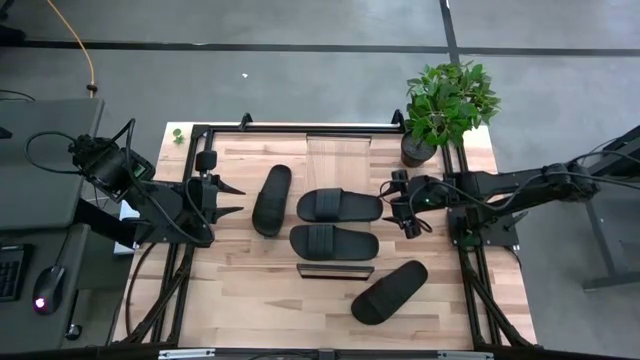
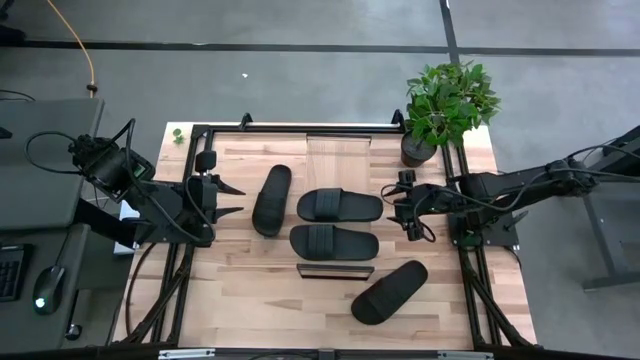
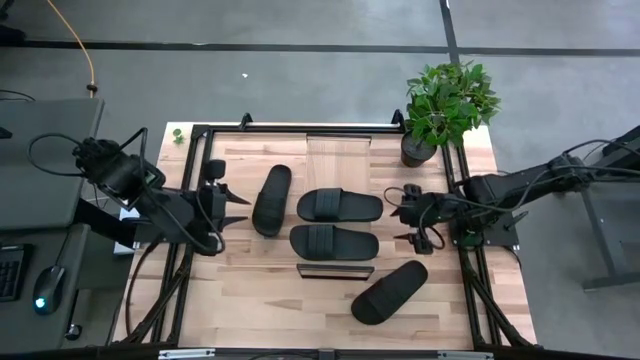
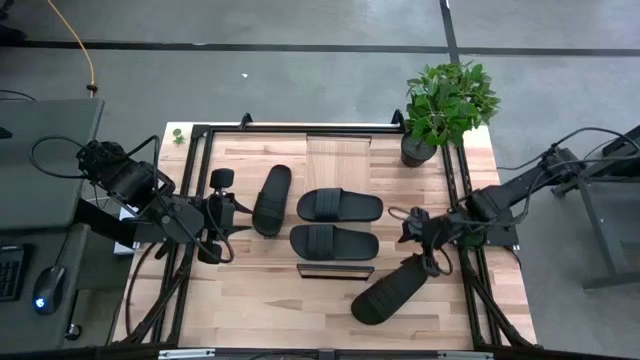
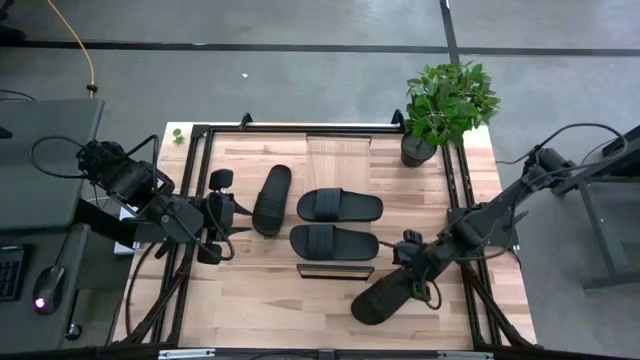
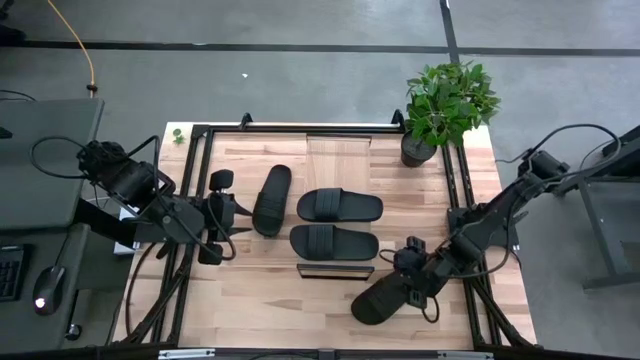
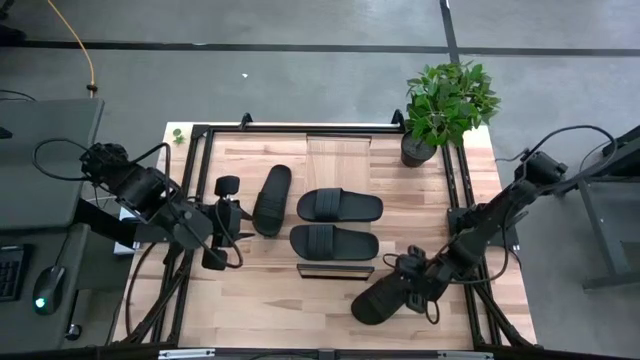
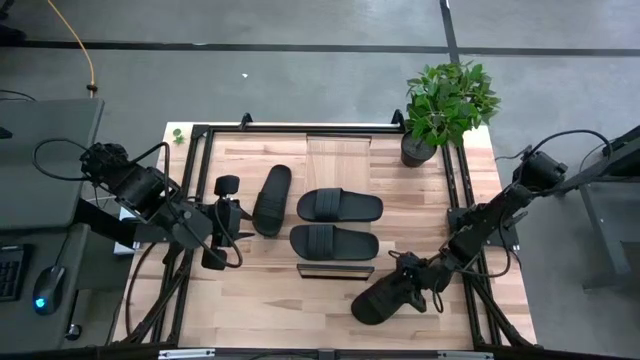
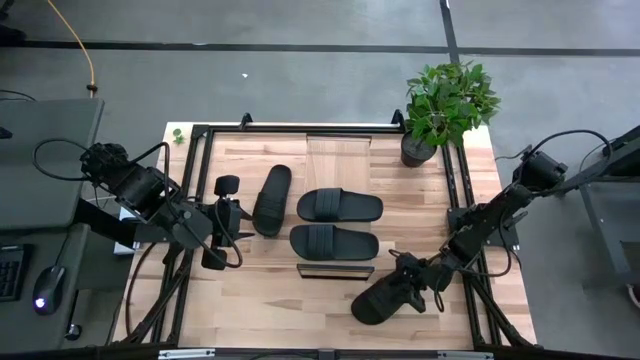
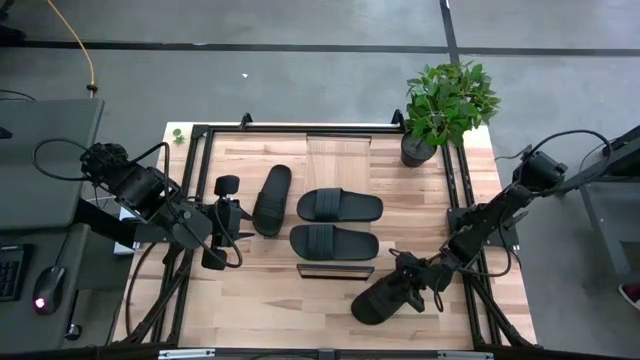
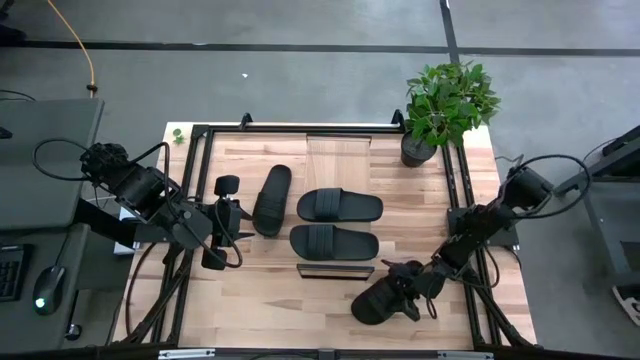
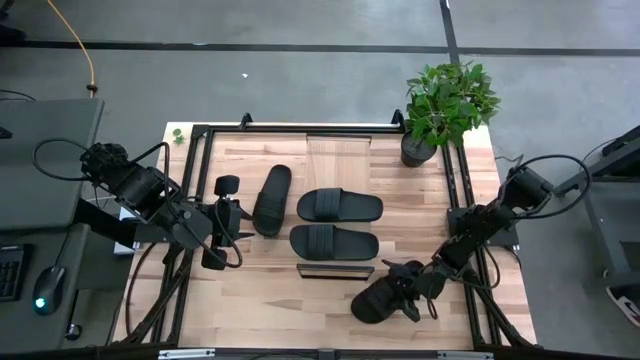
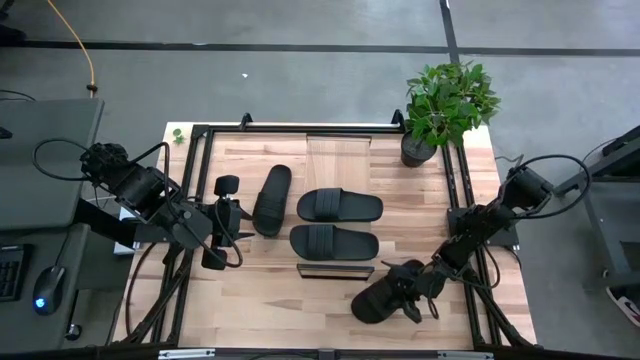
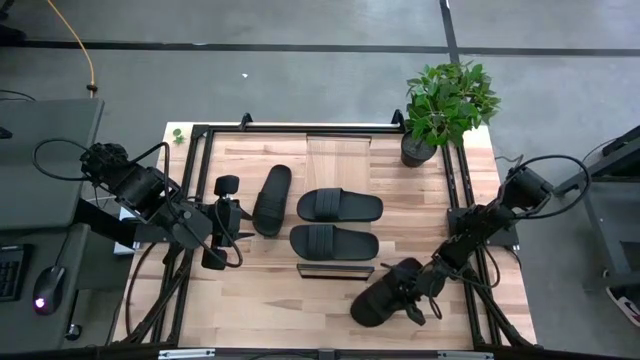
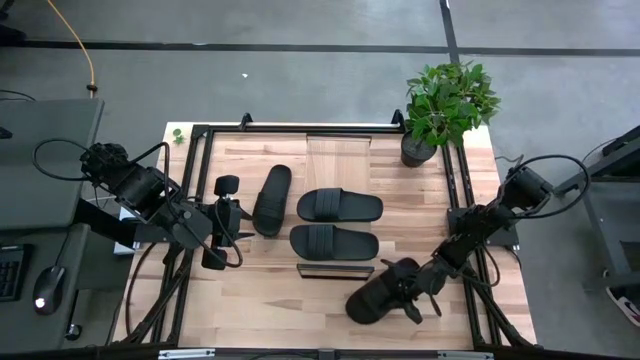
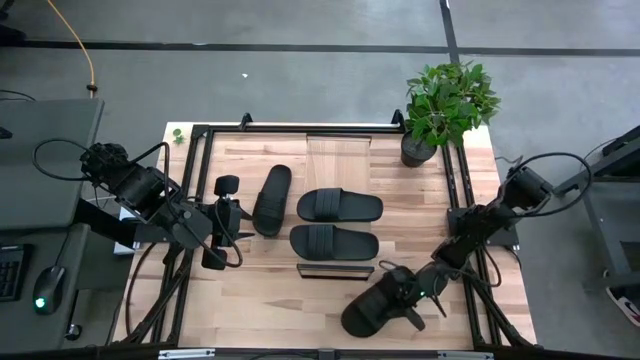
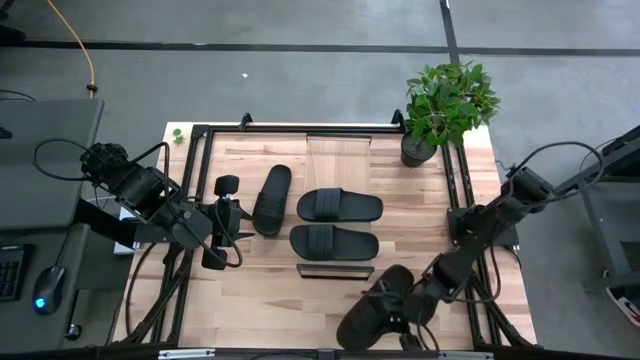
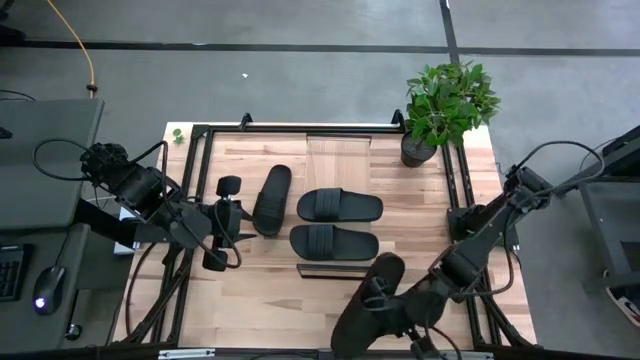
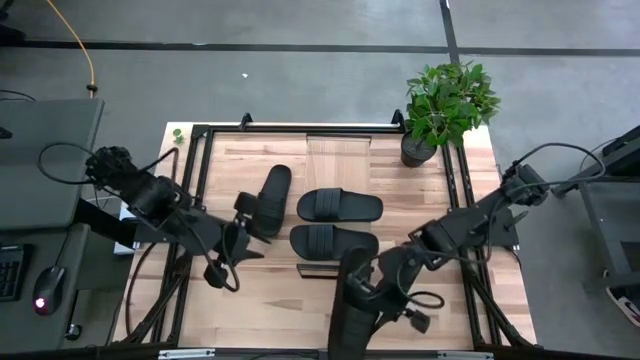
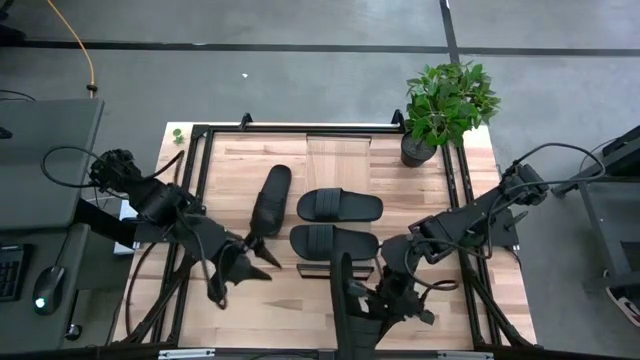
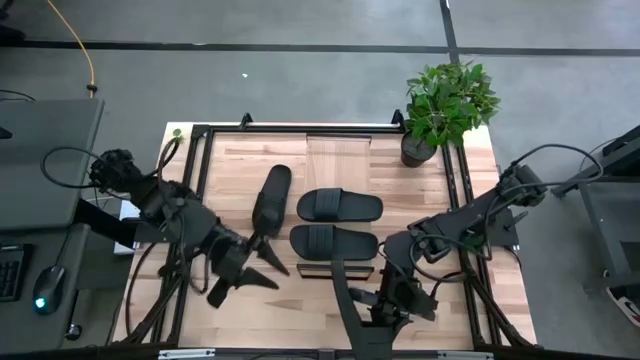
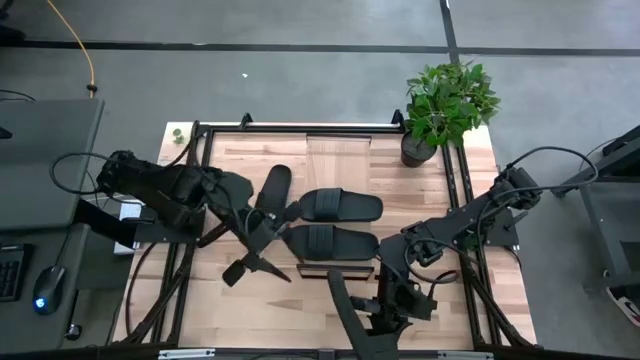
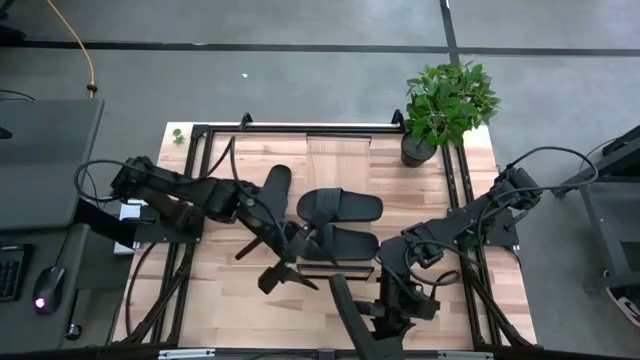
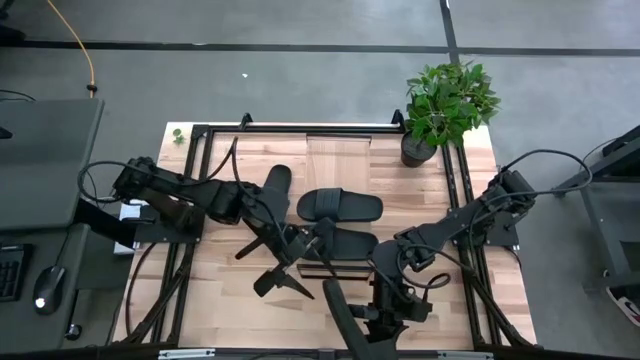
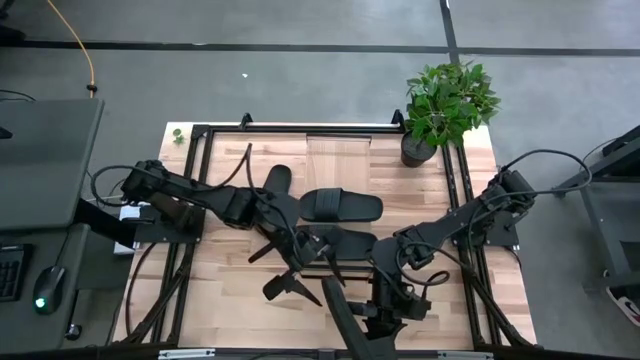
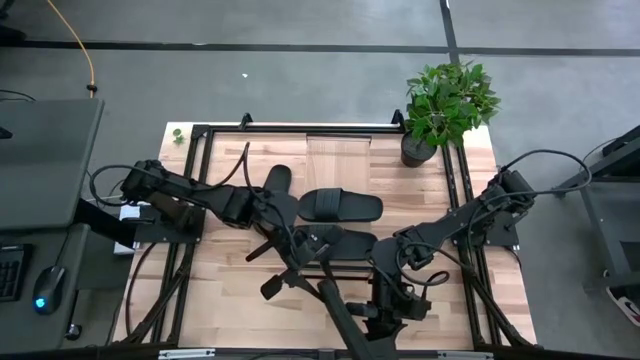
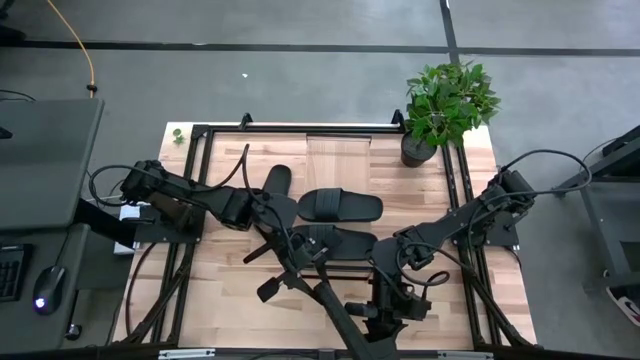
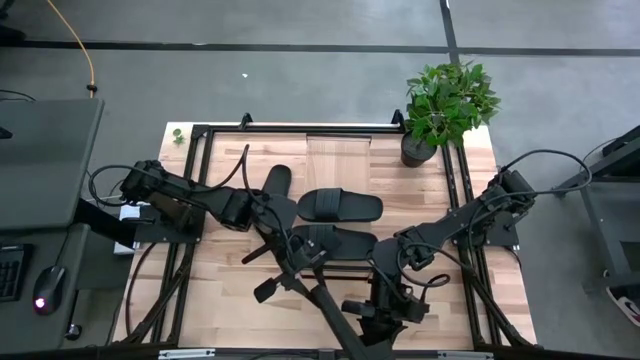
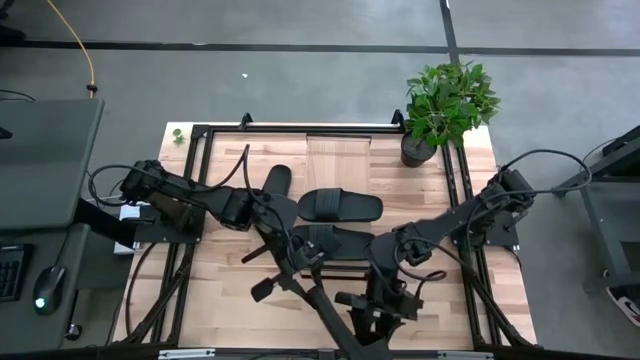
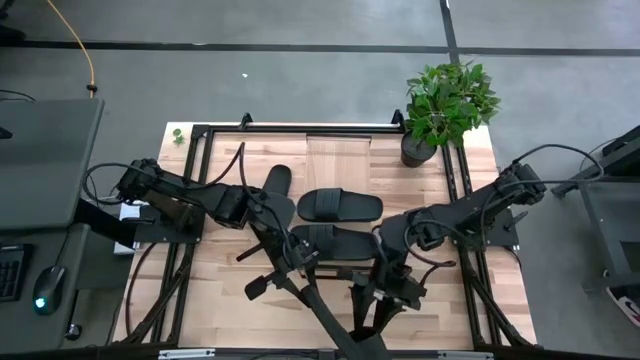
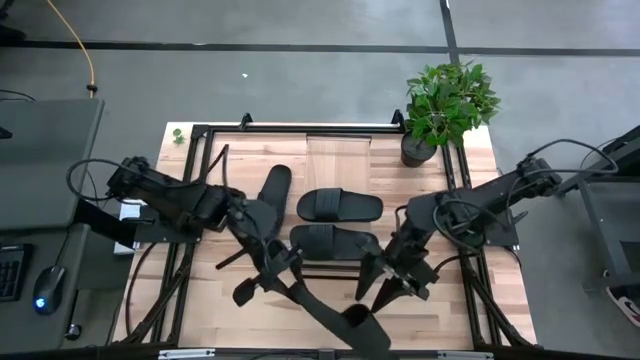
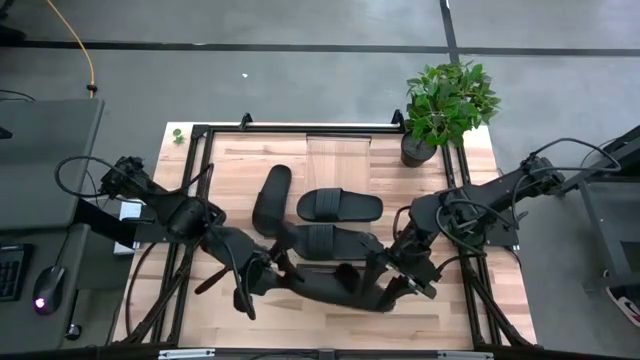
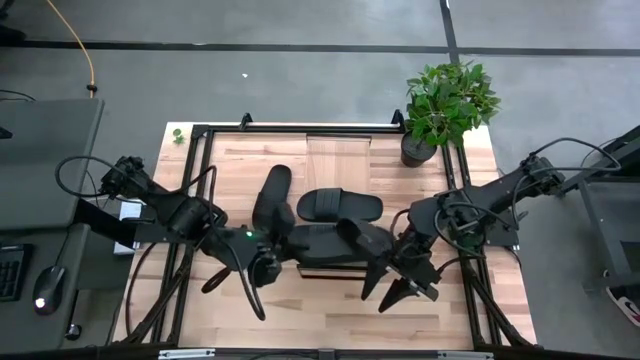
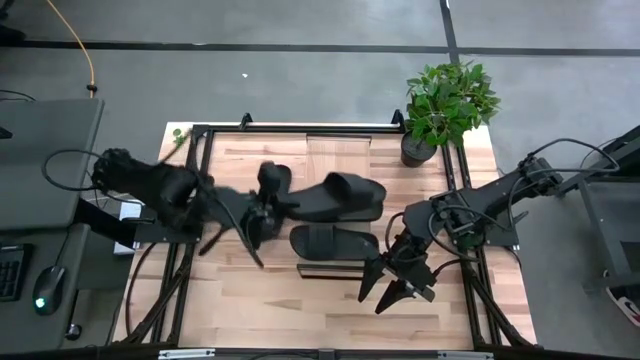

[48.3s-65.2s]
Task: Pick and place slides into the shelf
Put the bottom black slipper on the shelf

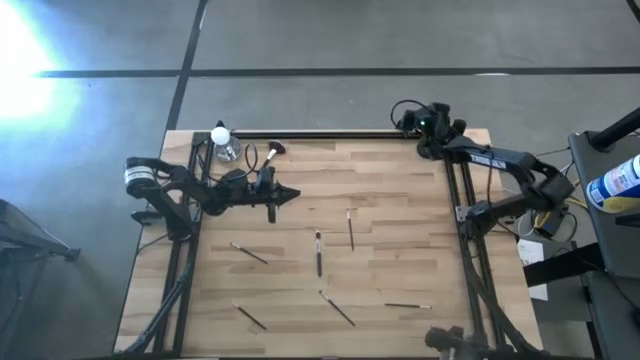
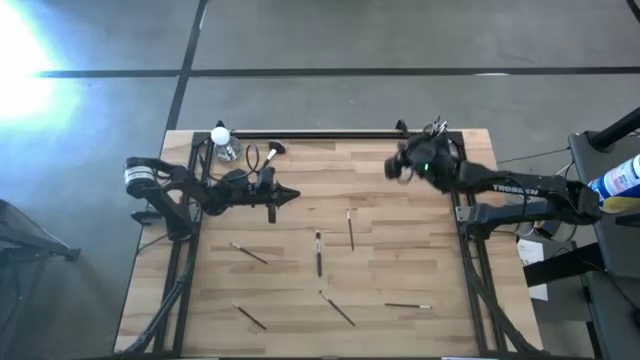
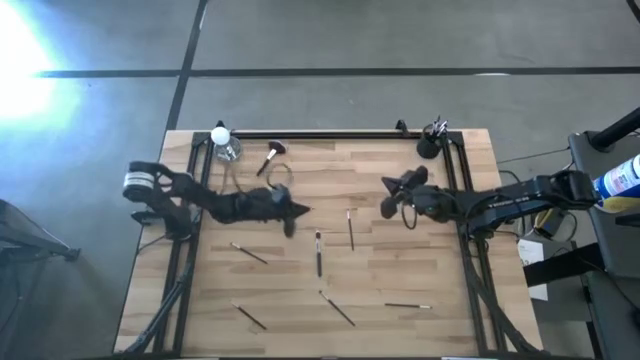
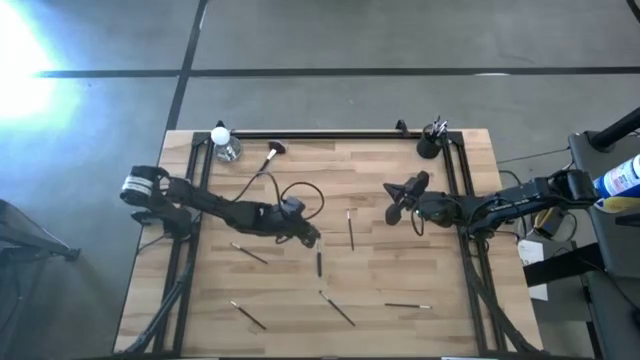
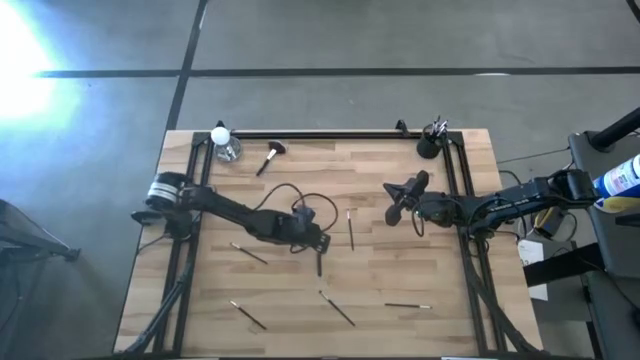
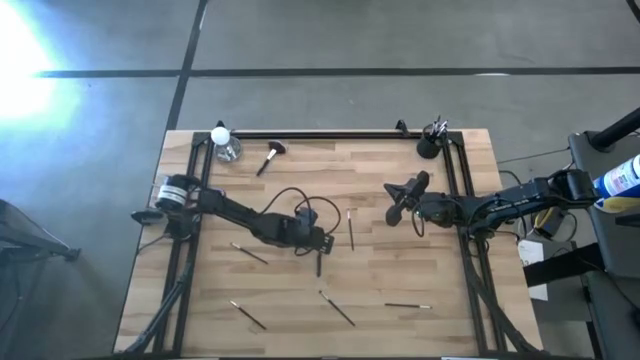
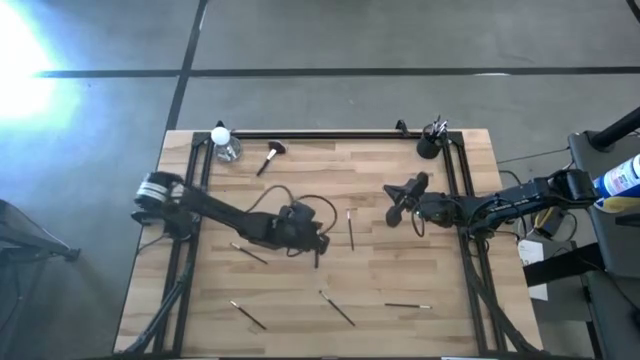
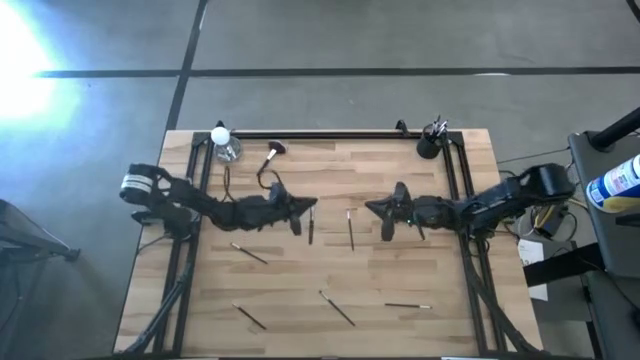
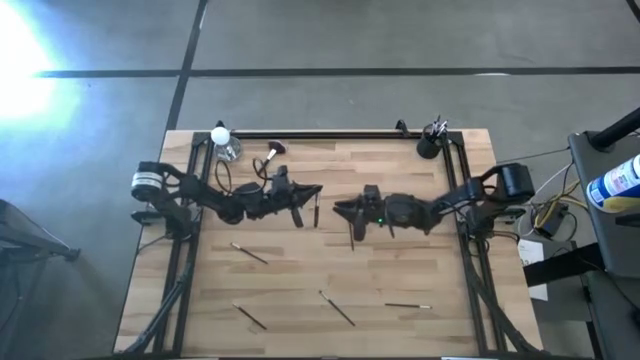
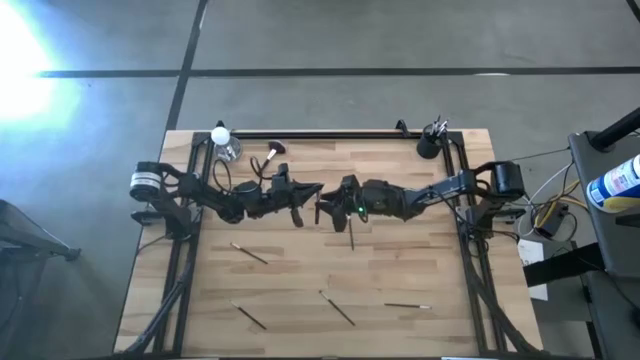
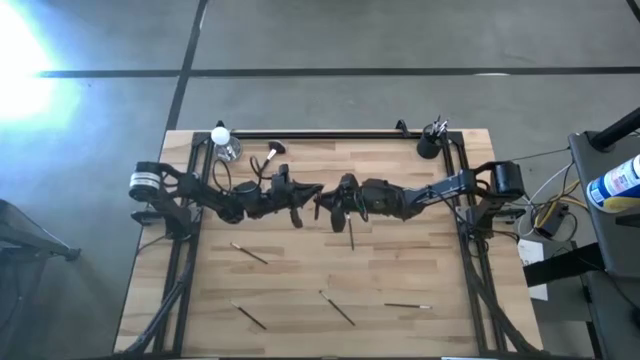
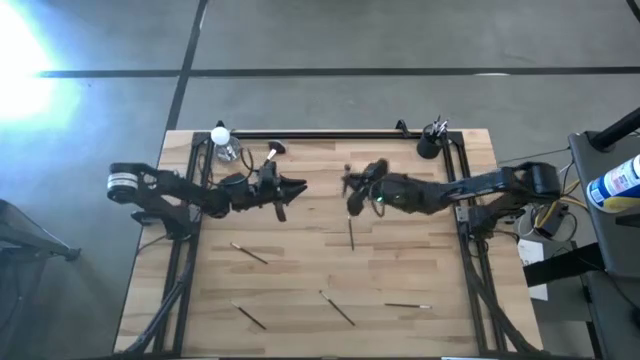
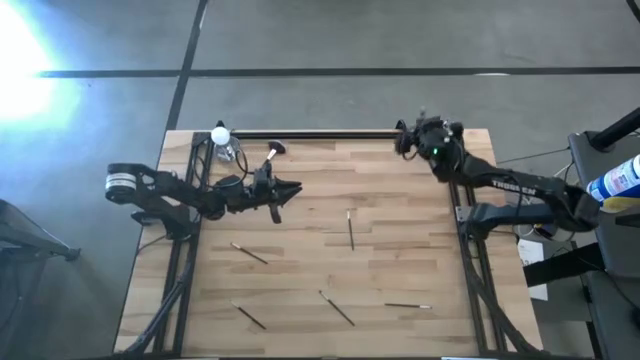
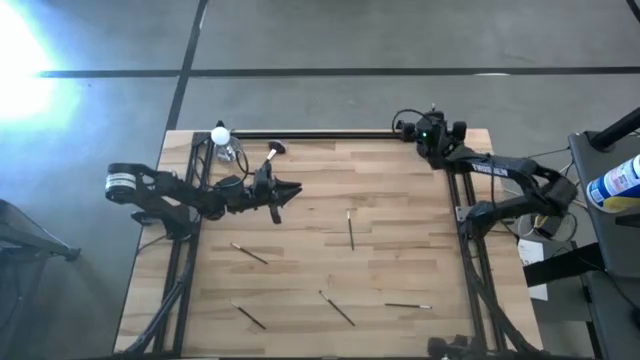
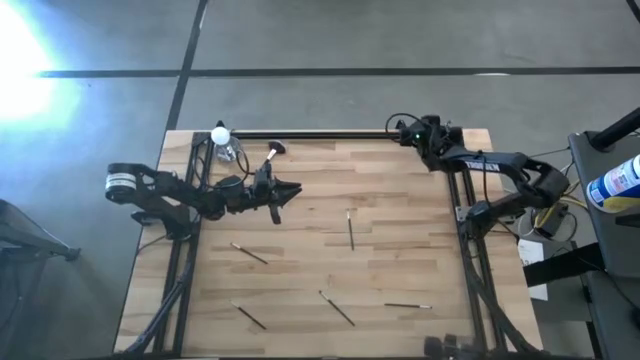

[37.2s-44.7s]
Task: Put items in baskets/containers
Put the blush brush into the mesh organizer
